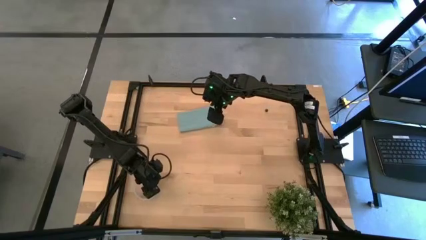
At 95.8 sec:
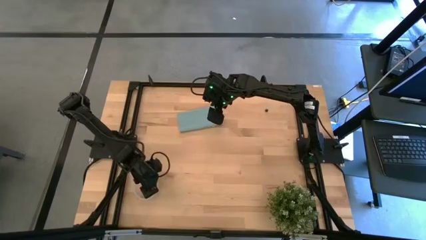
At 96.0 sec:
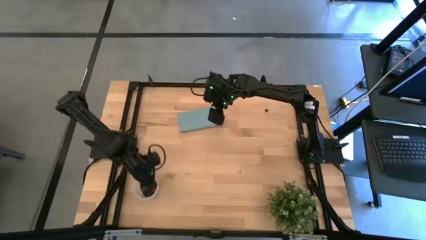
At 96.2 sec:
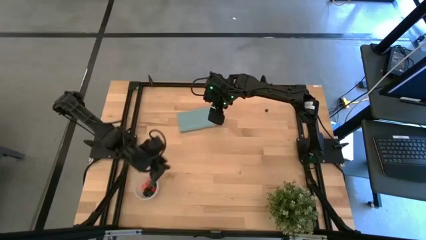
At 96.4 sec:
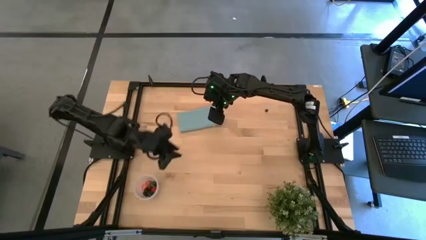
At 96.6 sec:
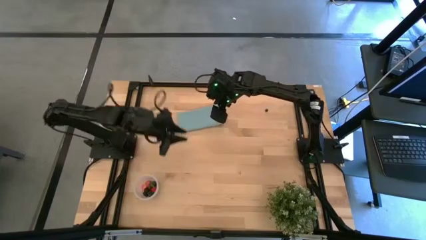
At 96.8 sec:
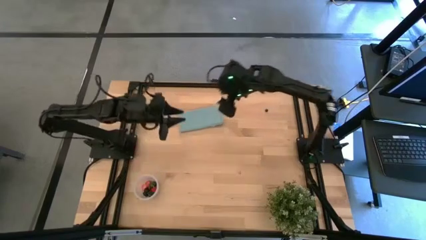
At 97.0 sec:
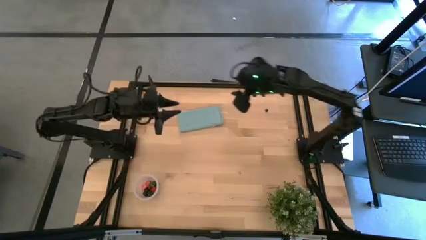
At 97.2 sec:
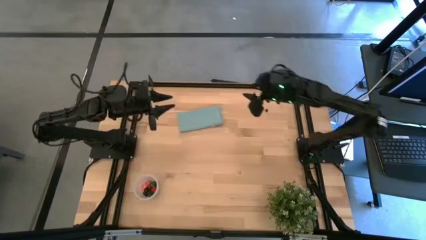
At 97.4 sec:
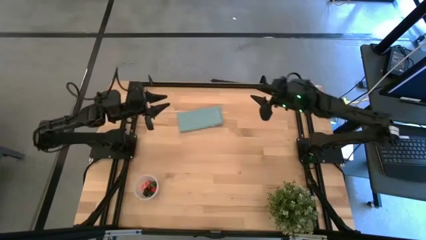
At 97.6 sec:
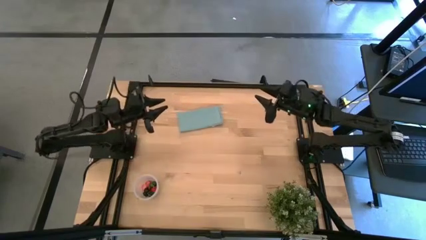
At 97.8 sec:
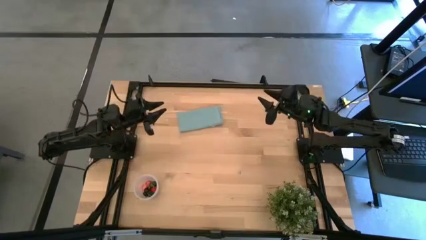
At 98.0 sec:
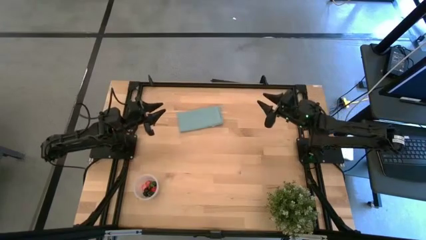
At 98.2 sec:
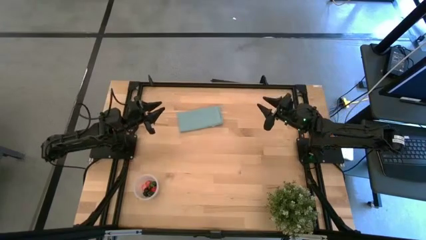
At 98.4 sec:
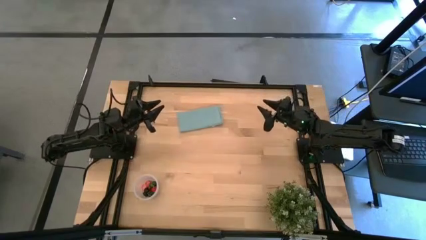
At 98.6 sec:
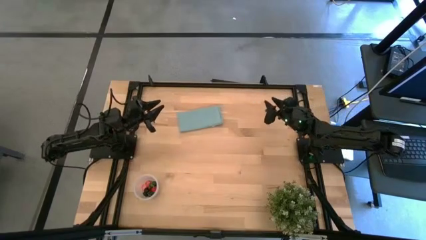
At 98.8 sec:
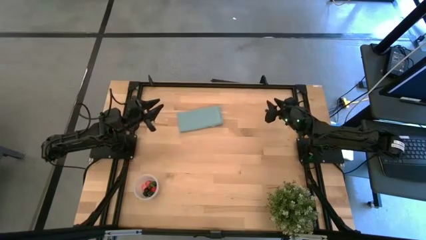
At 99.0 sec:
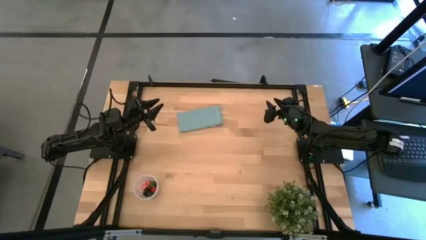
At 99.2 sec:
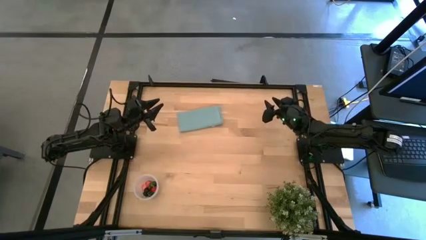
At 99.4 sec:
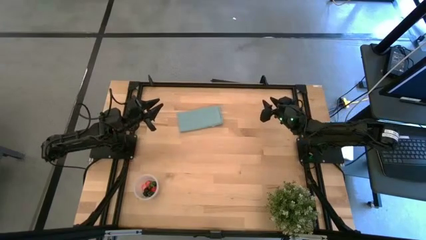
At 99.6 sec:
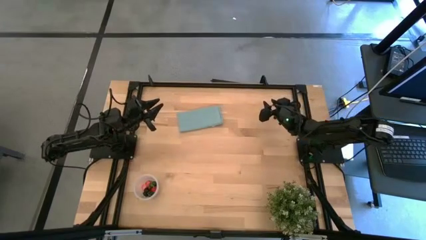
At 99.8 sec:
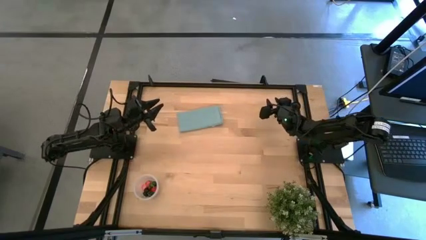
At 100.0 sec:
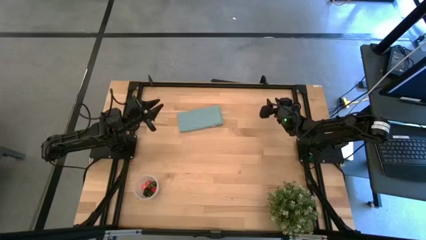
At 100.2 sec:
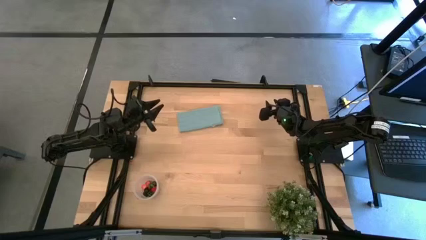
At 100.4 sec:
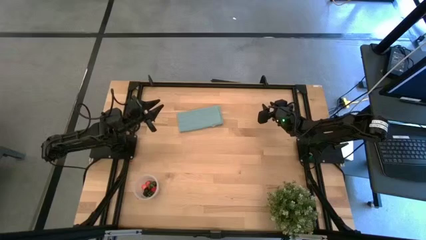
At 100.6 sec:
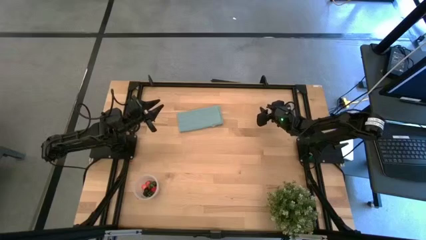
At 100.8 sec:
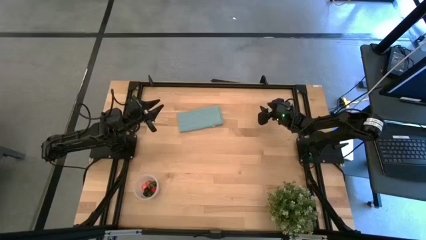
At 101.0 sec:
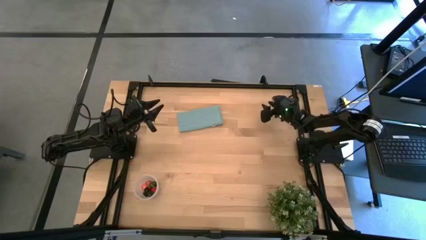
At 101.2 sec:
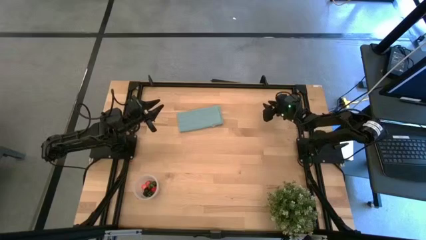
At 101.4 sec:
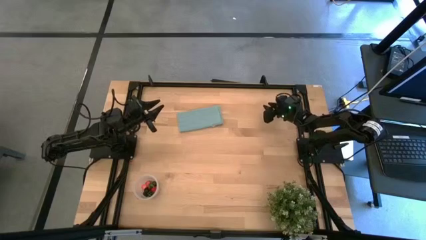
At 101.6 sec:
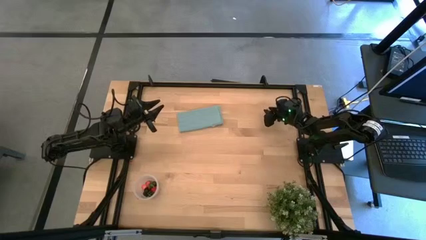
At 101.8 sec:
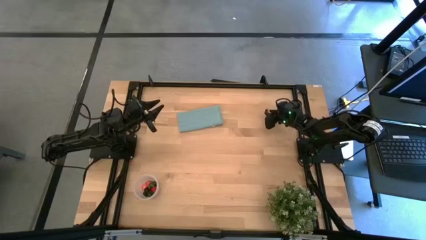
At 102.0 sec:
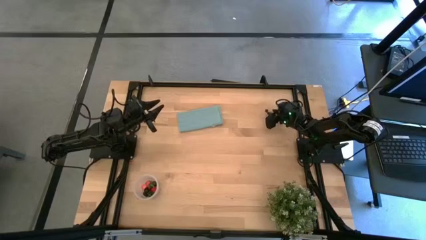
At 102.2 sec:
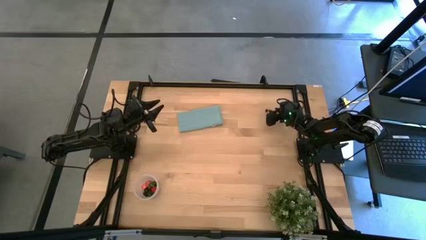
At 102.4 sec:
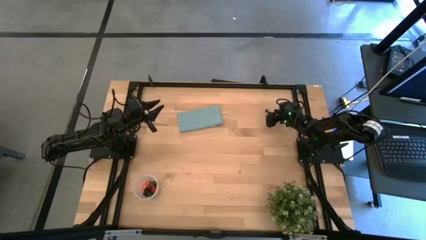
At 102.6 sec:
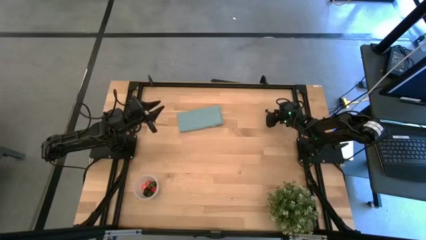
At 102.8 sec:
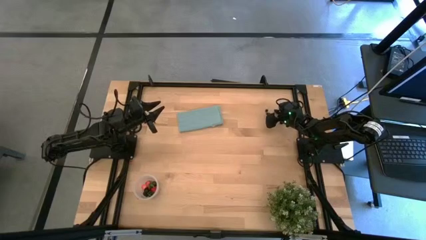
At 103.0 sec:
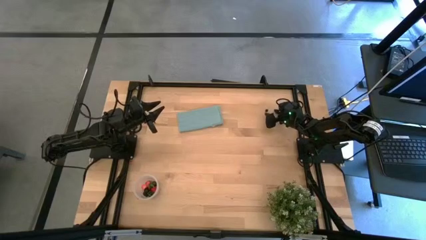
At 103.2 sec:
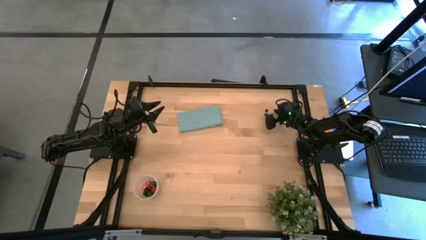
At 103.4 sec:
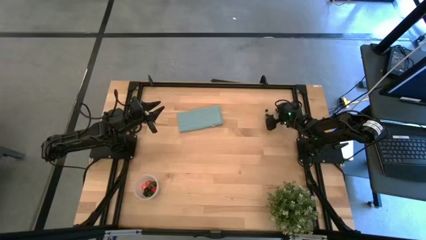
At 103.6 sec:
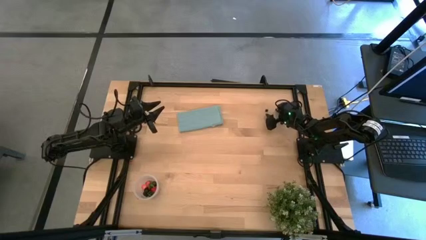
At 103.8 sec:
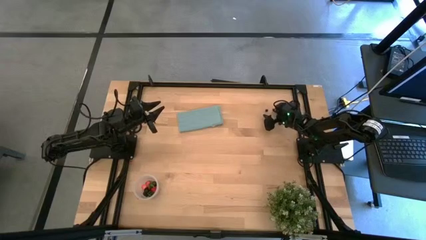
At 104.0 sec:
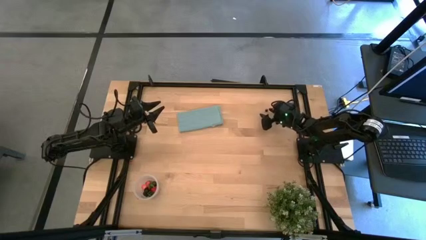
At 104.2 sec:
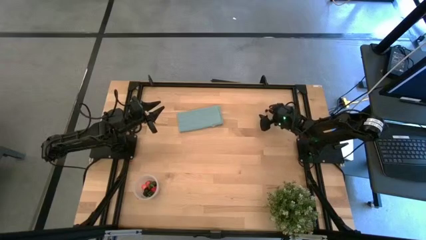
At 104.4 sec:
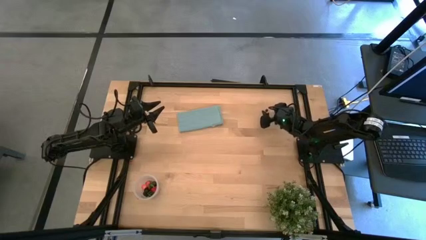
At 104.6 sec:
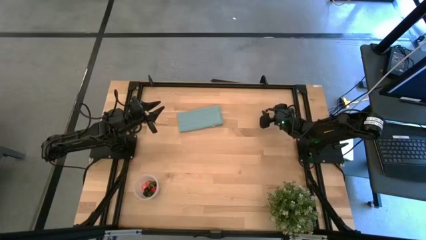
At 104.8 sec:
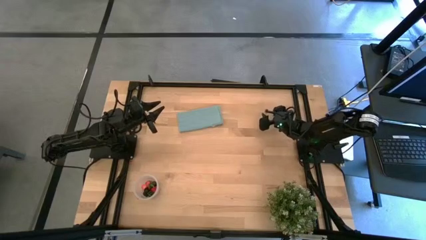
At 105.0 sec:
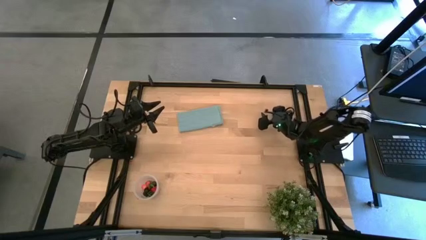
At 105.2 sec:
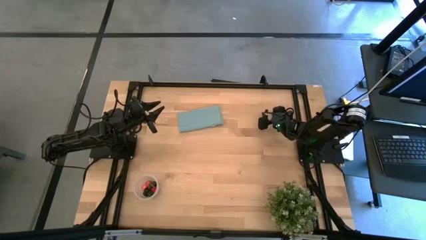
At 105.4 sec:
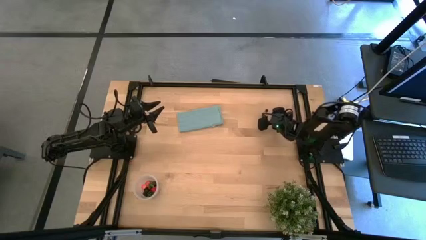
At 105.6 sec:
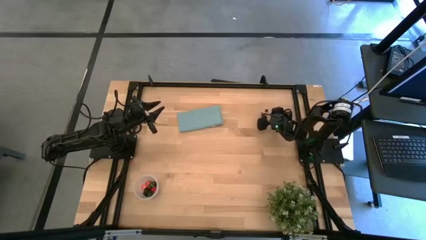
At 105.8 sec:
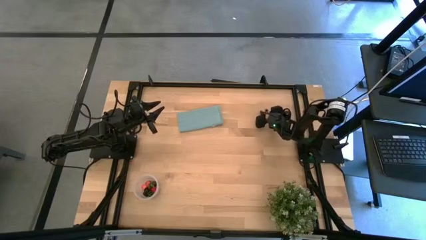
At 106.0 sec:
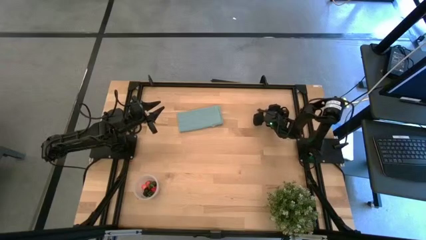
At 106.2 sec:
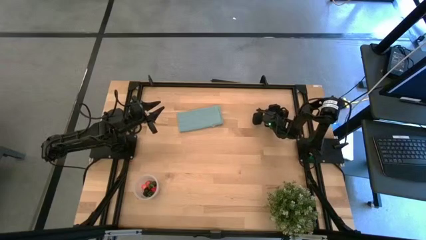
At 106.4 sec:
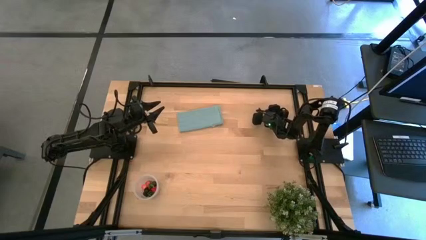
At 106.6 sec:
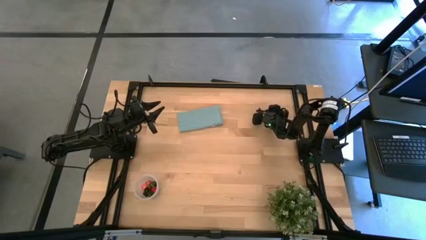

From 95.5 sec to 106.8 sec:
Task: Pick and placing Produce into tupperware
Put the blueberry into the transparent container

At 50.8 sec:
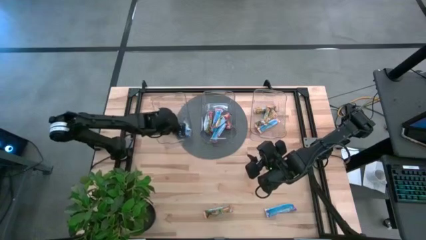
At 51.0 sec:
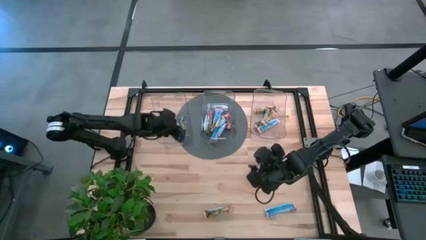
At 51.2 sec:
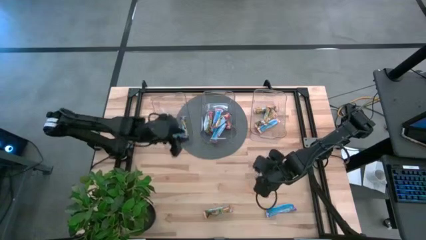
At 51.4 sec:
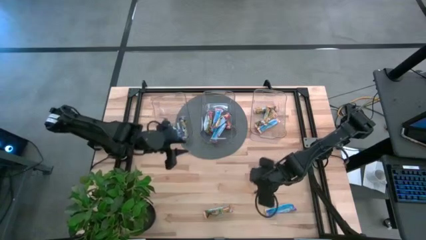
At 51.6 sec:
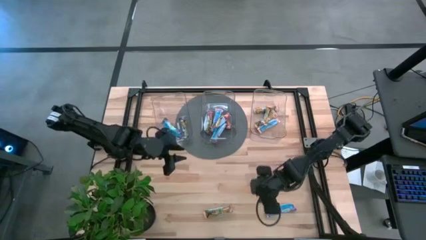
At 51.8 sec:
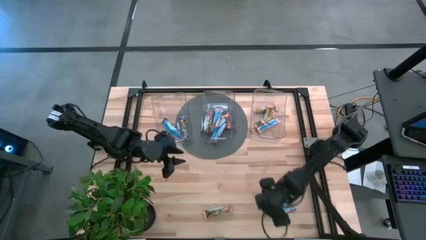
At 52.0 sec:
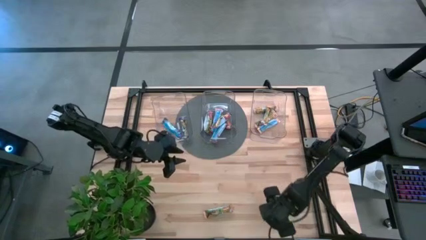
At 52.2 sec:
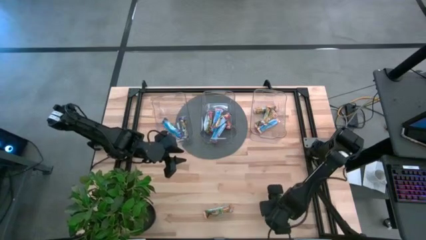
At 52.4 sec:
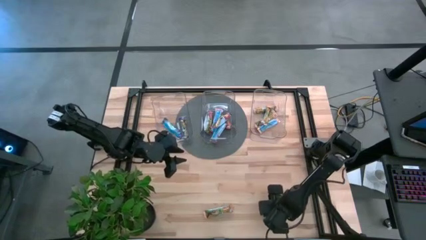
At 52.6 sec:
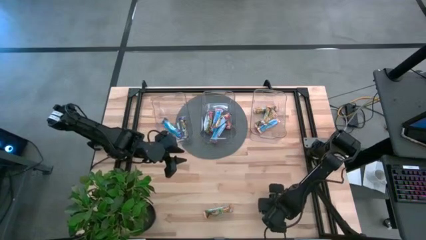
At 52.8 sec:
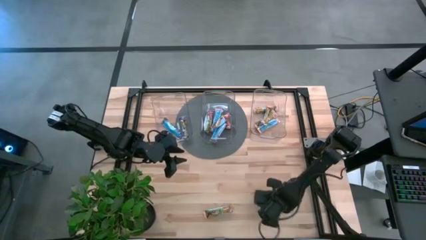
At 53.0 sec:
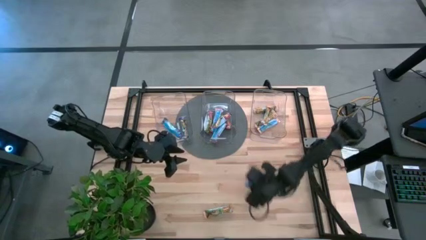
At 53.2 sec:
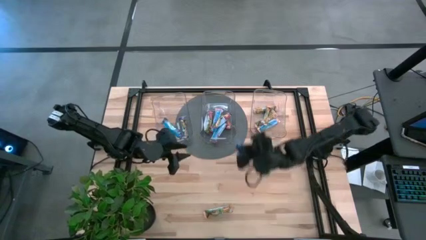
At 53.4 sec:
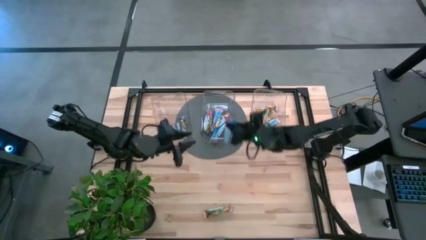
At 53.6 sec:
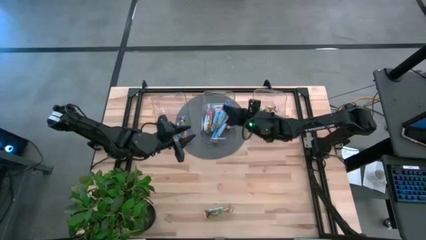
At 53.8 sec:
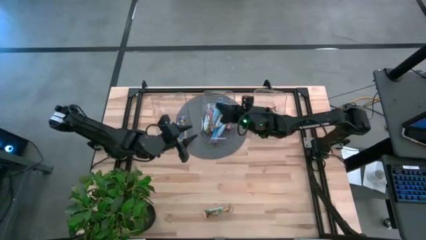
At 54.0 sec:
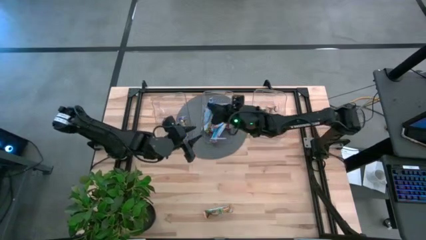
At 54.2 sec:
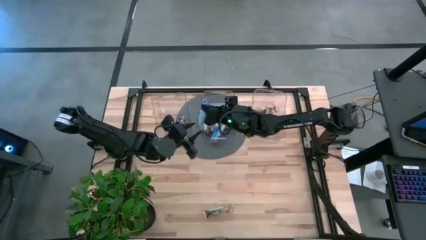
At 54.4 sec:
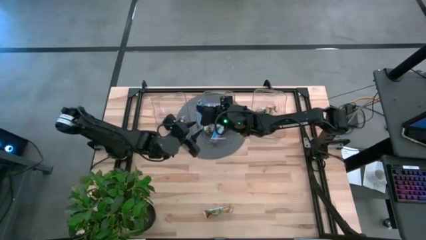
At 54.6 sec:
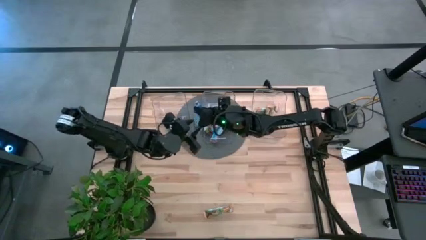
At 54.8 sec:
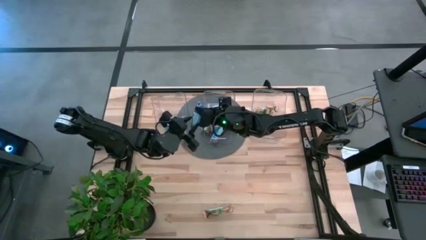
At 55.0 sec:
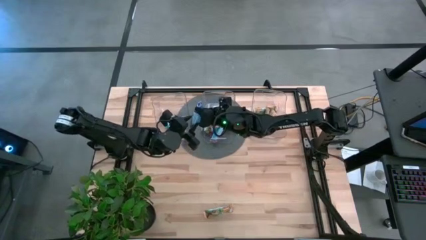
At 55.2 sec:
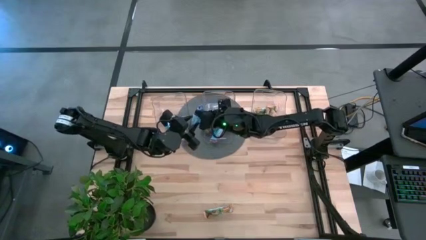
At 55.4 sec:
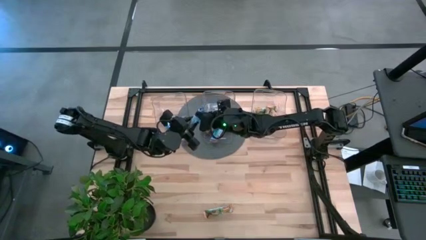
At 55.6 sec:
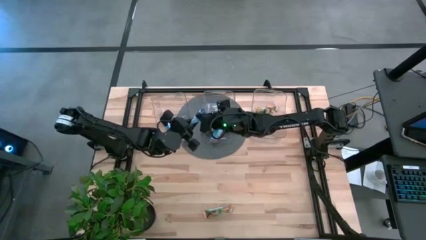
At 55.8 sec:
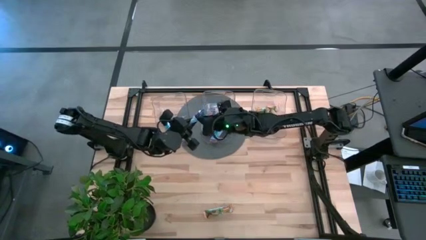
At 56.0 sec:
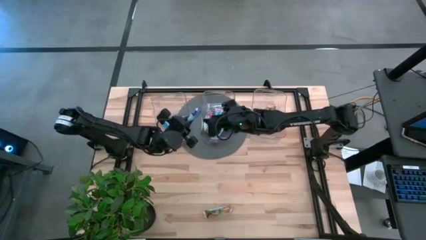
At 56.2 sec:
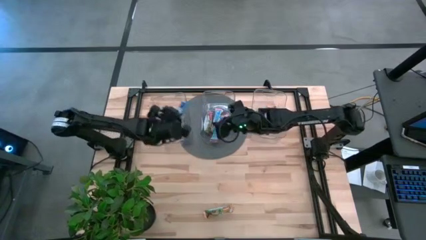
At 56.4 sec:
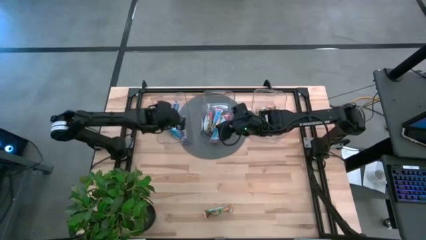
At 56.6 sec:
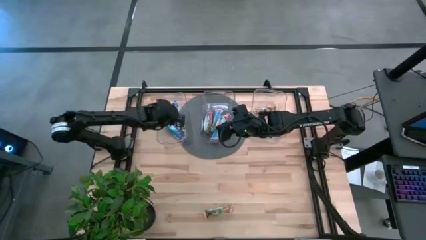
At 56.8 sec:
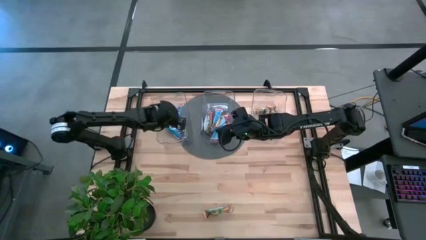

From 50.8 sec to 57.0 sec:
Task: Pick and place Granola Bars by type
Put the blue granola bar into the left transparent bin
